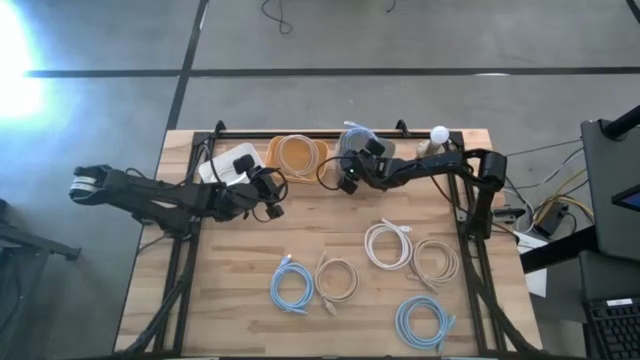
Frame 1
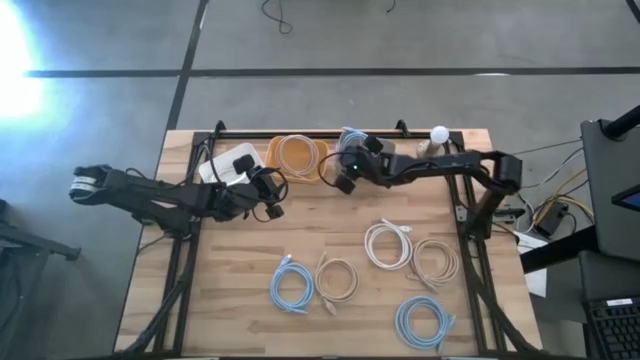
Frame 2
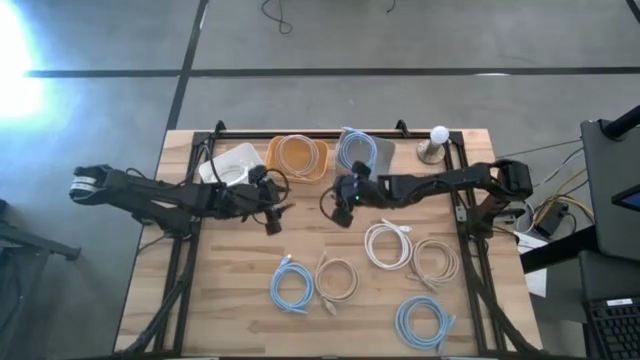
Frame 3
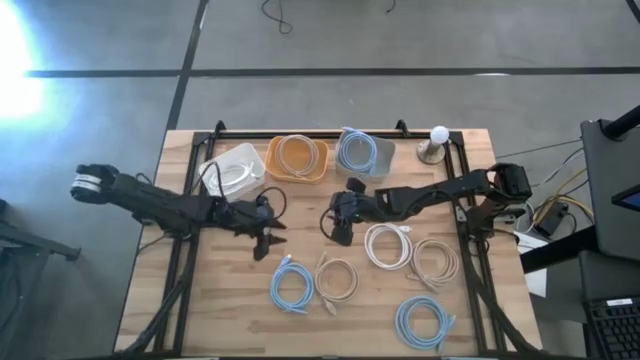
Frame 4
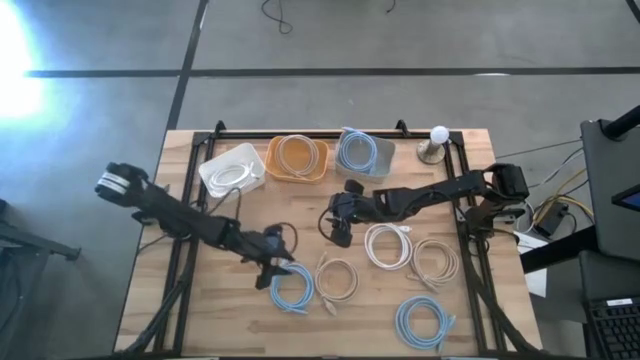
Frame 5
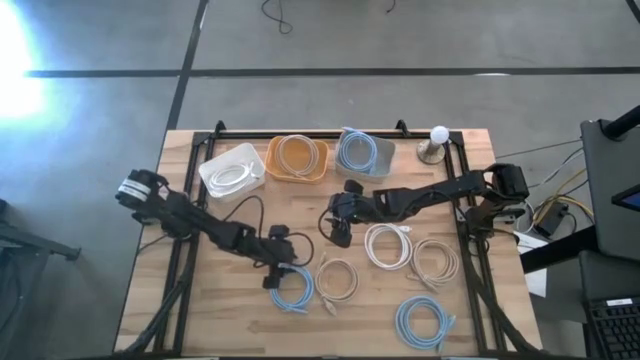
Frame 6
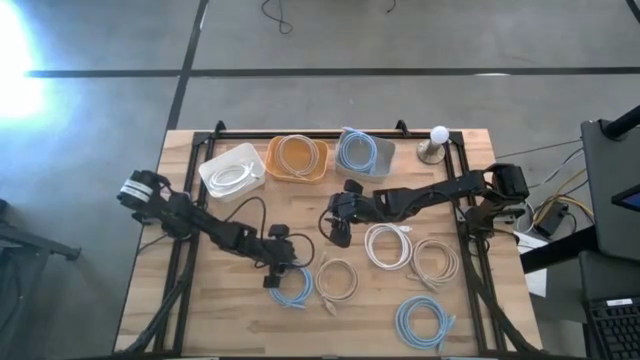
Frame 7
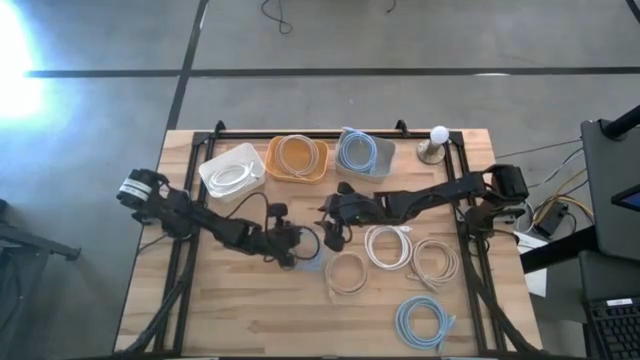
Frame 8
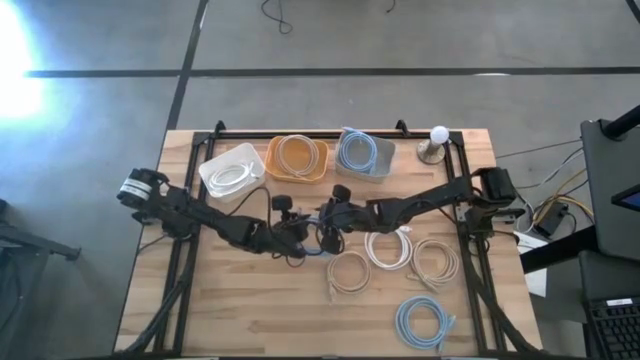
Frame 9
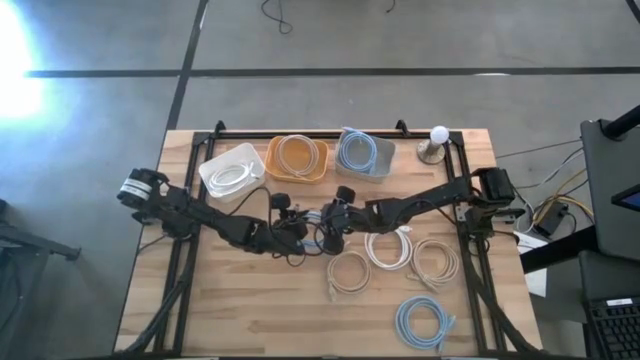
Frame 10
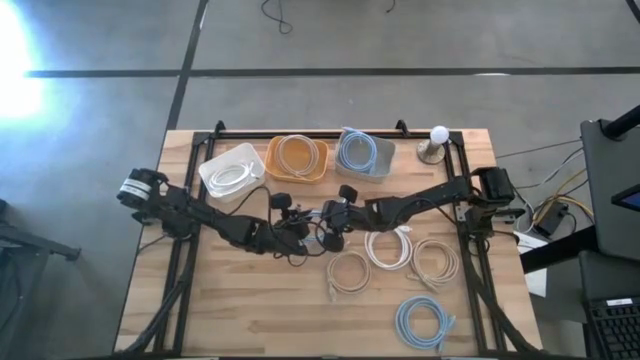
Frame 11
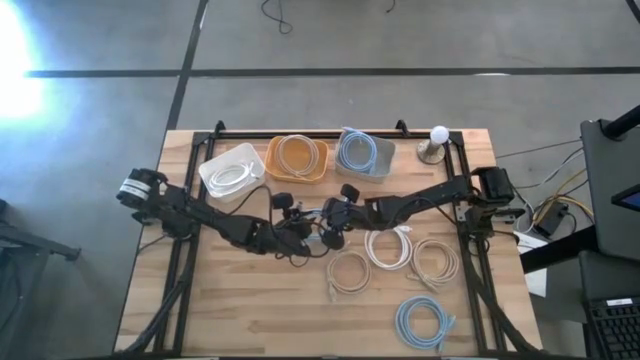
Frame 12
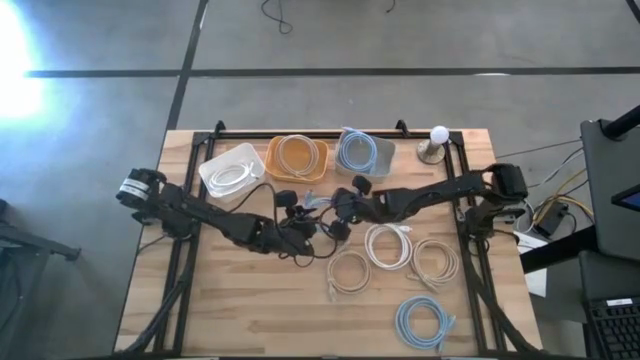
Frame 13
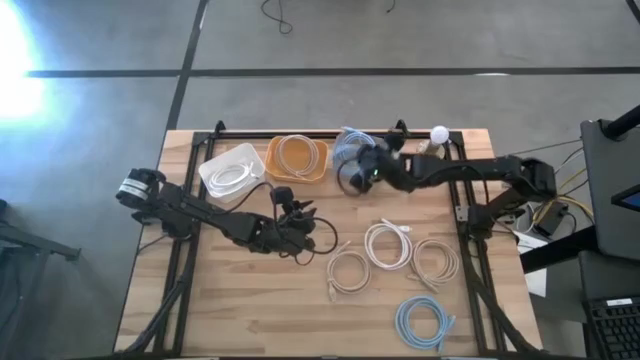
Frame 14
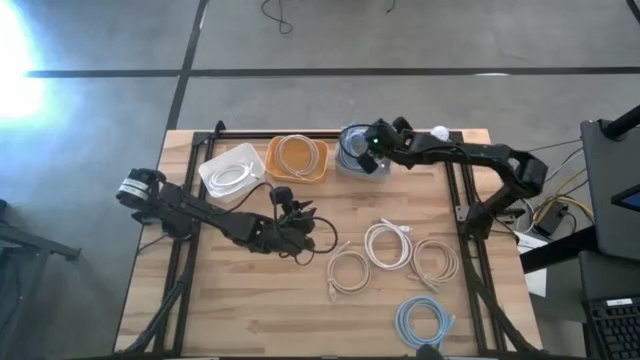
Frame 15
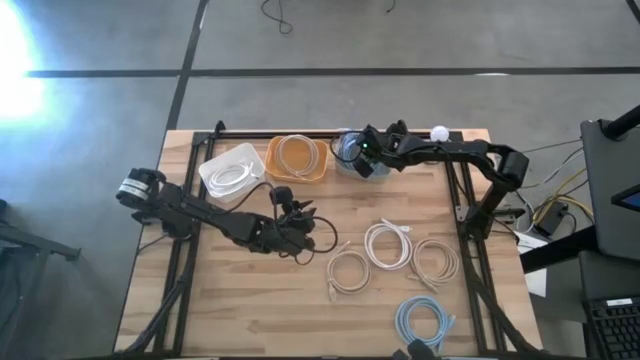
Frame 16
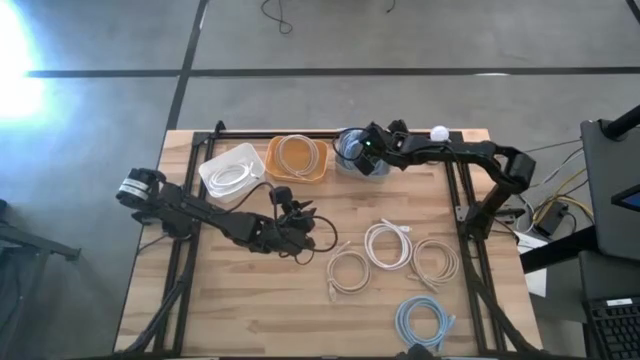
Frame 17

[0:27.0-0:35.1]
Task: Pick & Place USB Port
Put the left blue display cable into the gray bin

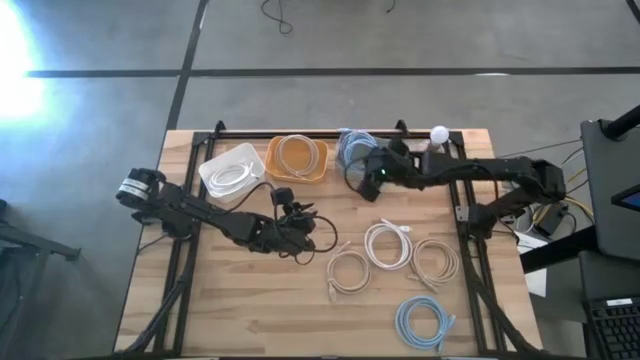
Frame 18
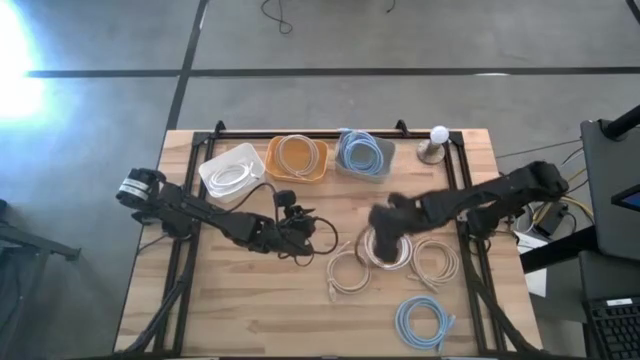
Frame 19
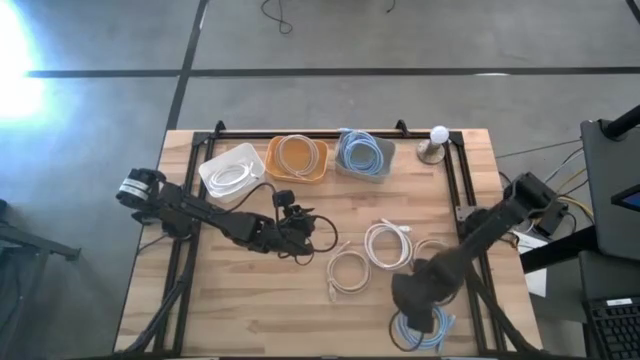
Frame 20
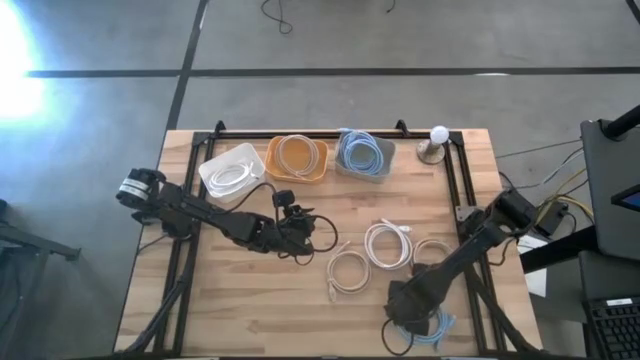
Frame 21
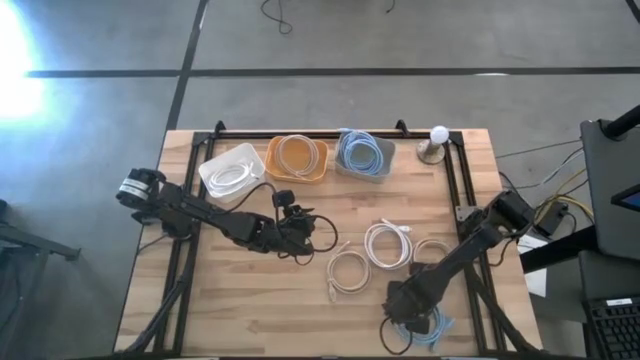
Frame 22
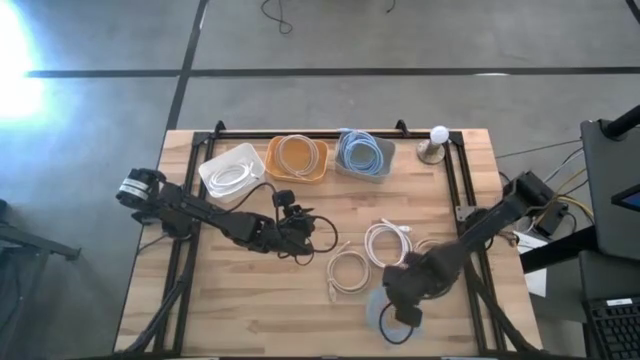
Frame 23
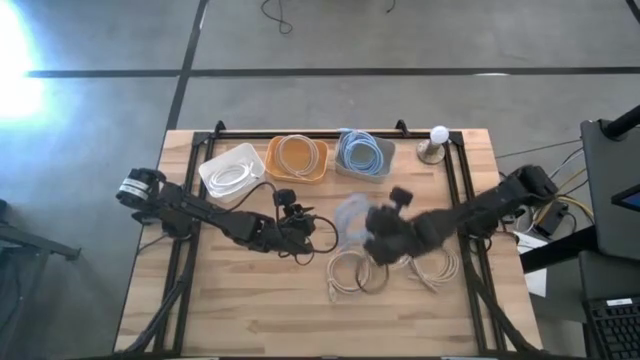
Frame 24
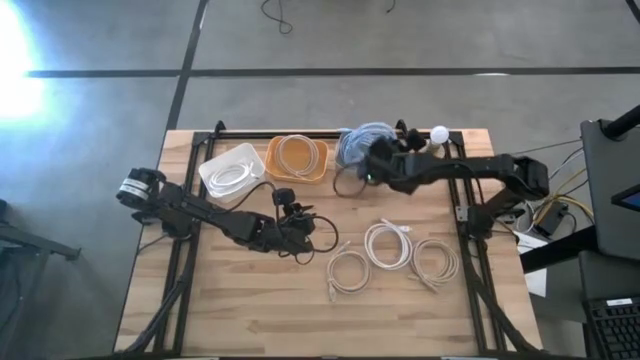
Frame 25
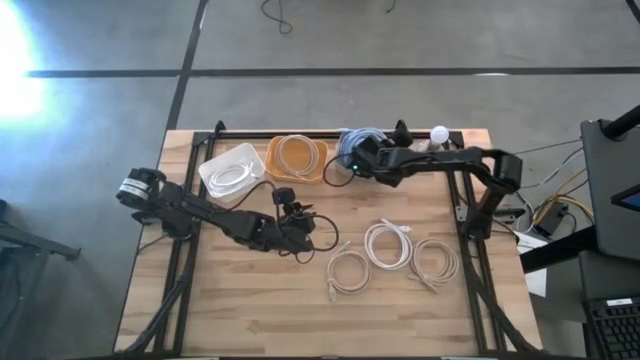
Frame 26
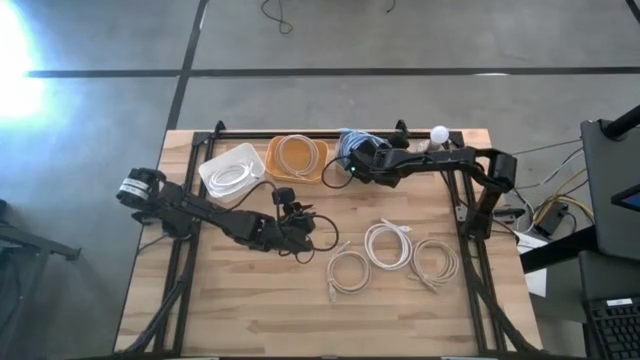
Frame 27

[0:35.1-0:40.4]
Put the blue display cable into the gray bin

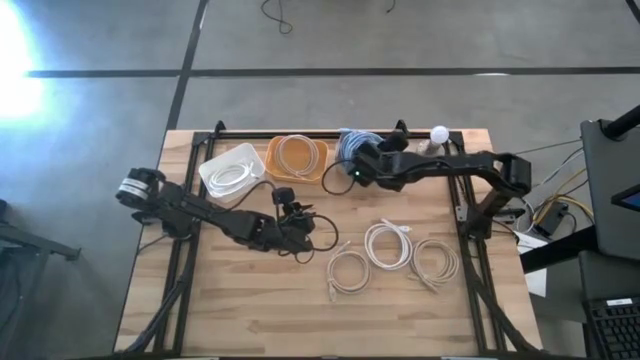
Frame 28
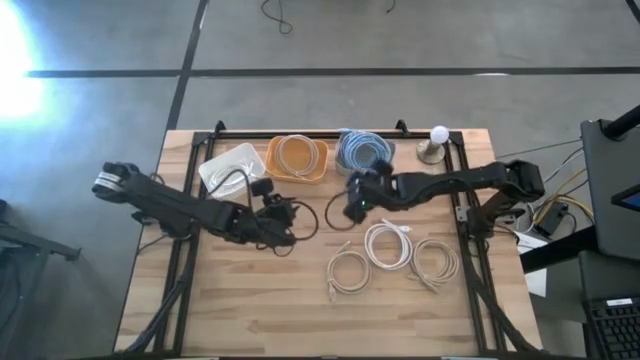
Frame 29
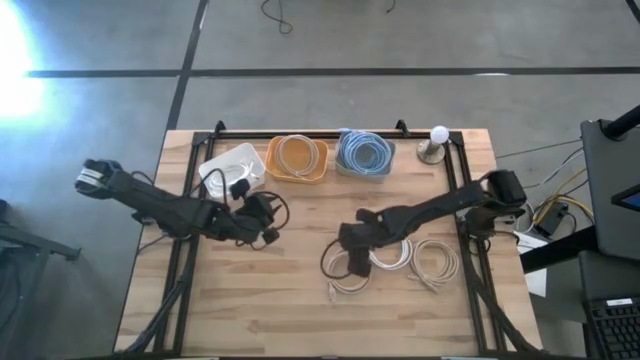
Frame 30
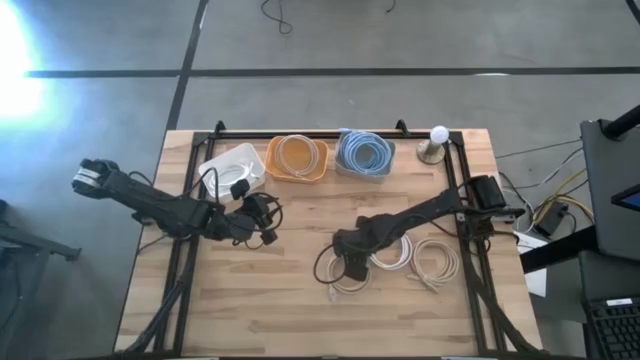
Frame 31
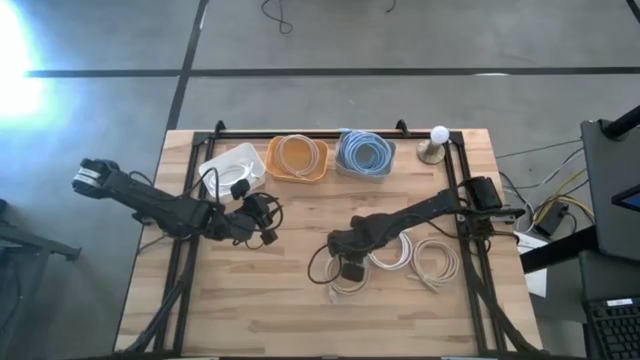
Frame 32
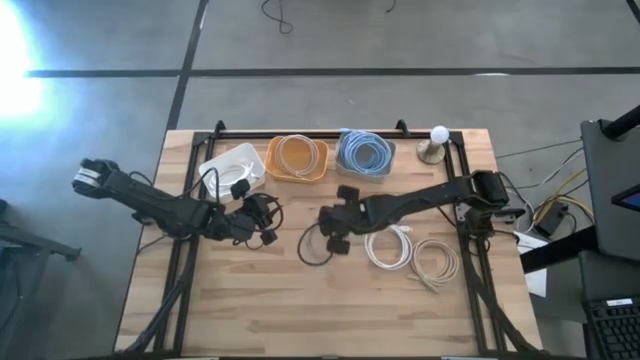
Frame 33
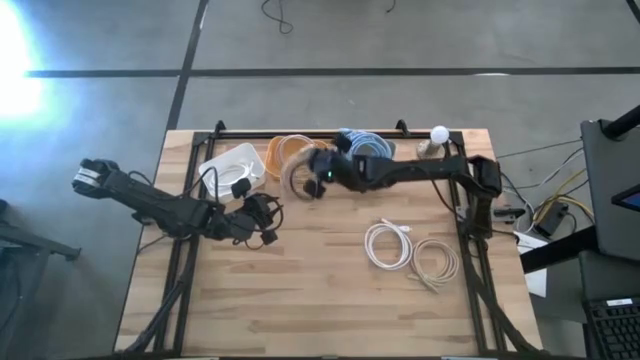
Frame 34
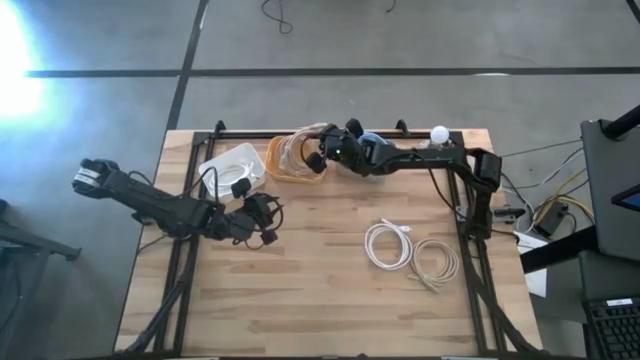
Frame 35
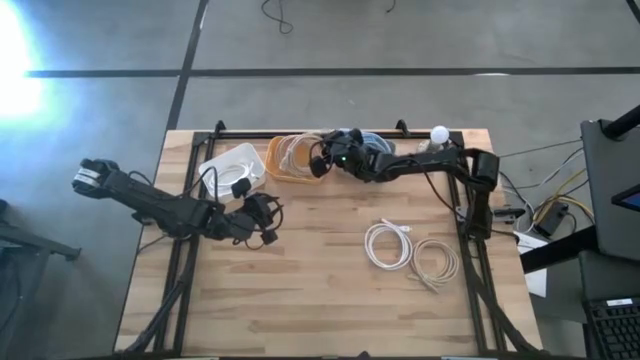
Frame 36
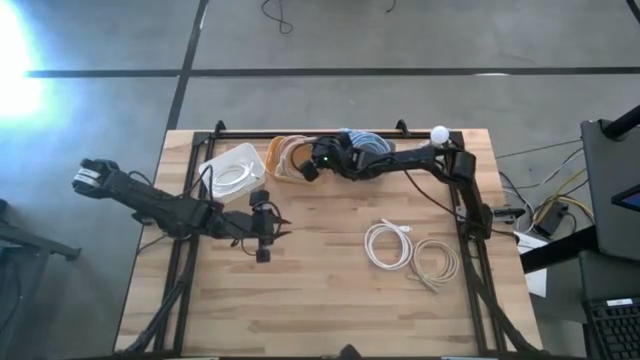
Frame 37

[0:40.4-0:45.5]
Put the left brown display cable into the yellow bin

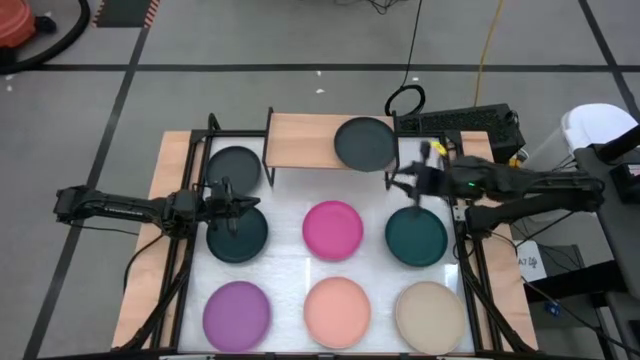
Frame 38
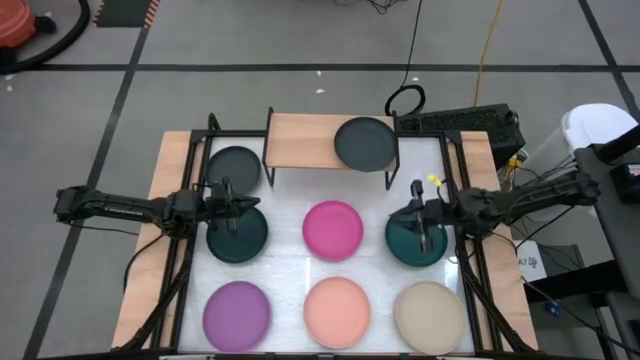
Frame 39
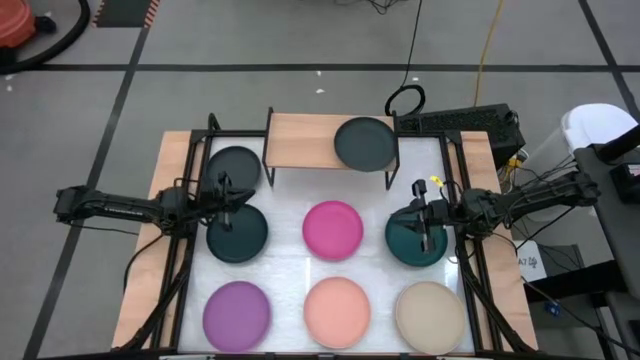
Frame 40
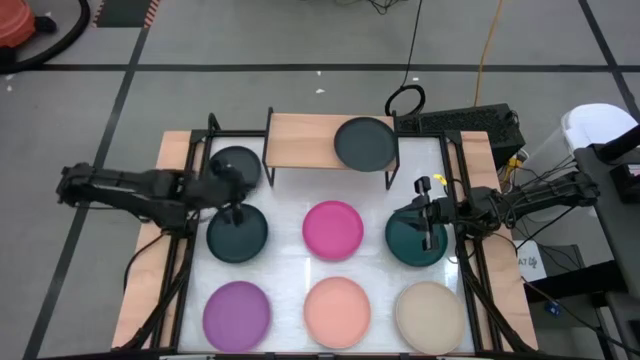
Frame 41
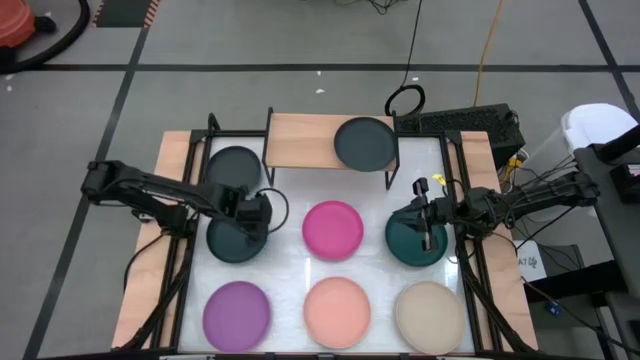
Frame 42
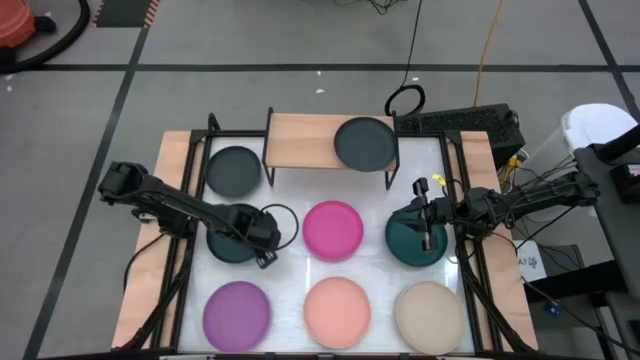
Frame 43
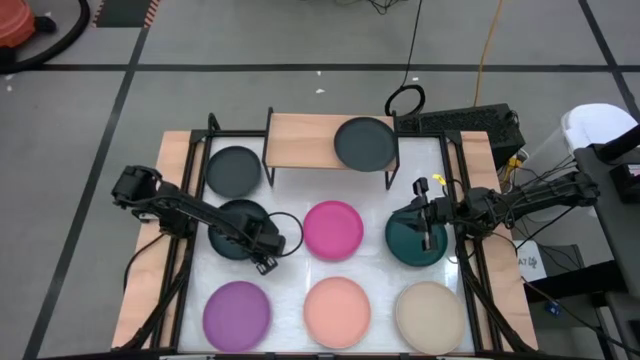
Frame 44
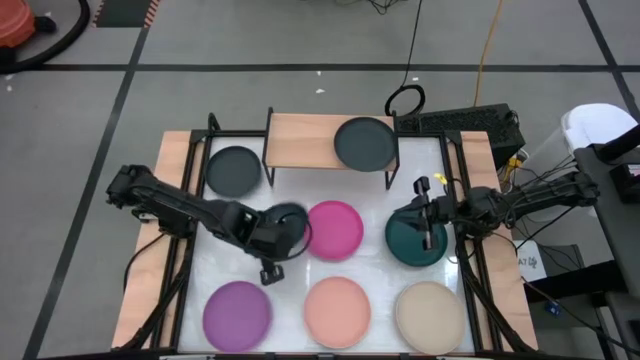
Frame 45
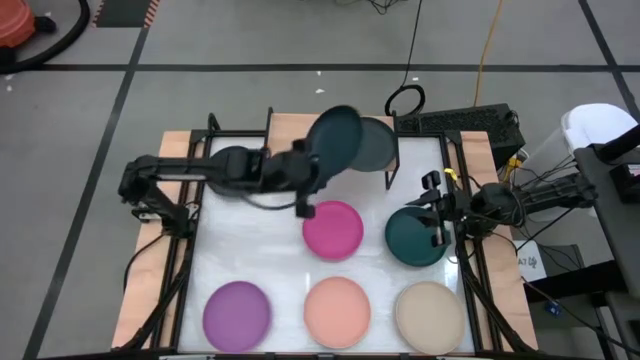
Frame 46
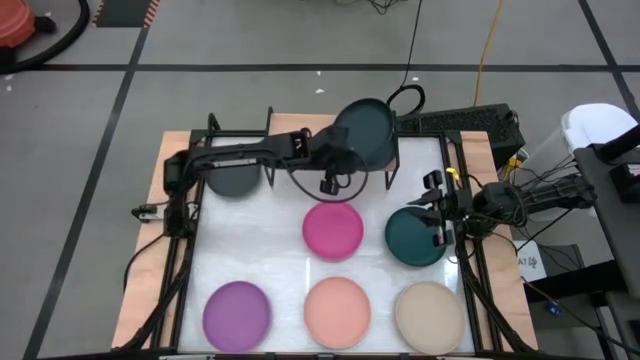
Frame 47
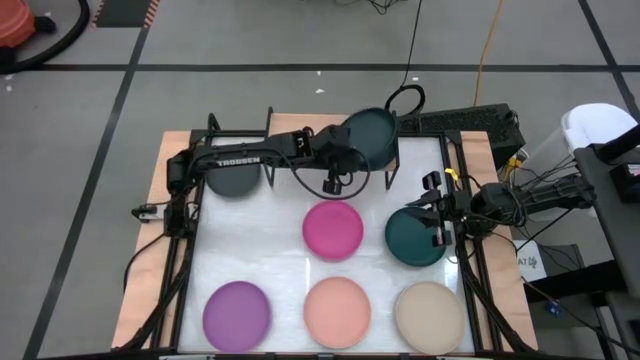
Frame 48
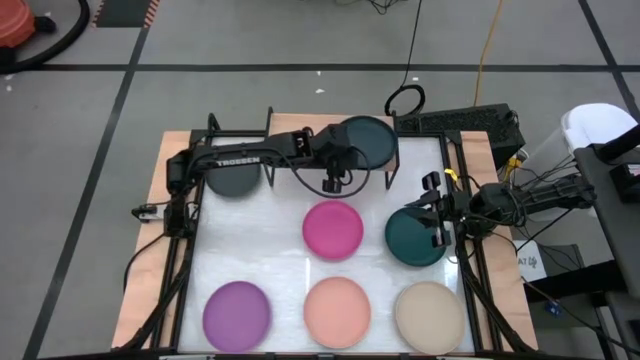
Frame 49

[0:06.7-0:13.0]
Task: Place and stack plates onto a shelf
Stack the left dark green on top of the black plate on the shelf
